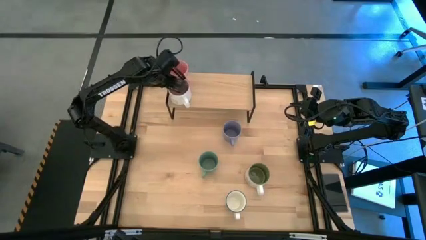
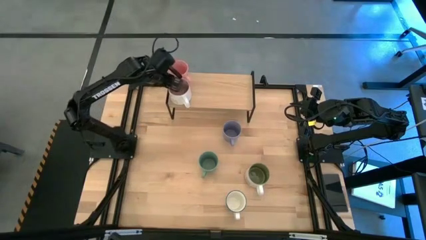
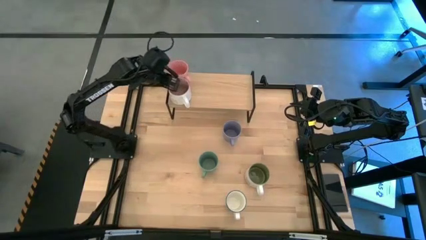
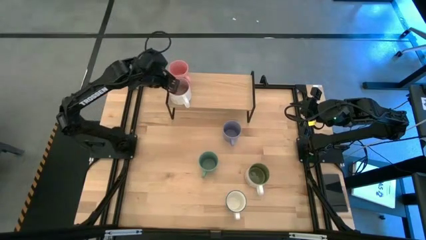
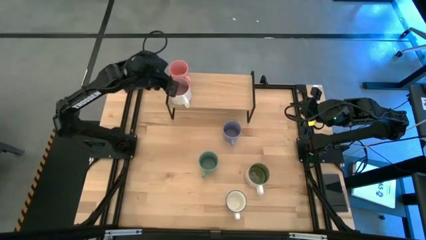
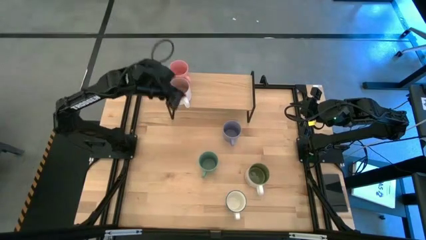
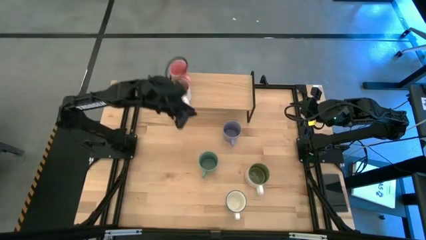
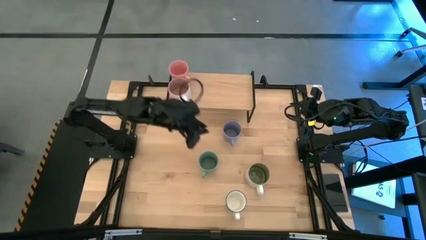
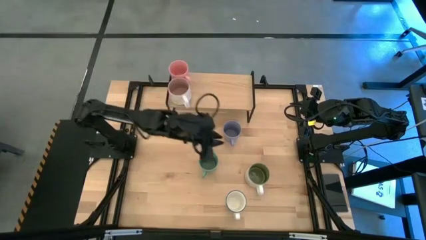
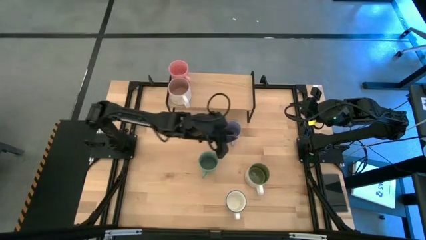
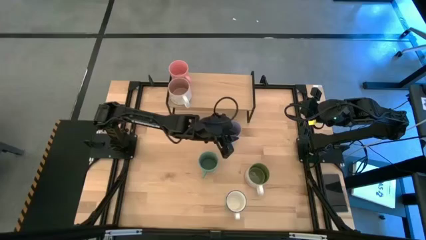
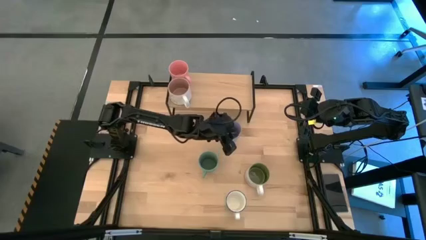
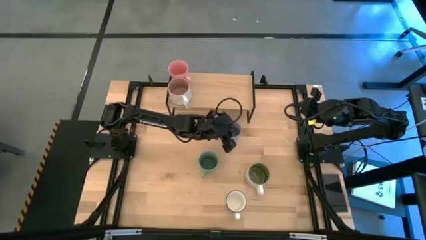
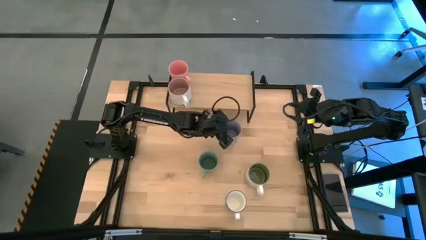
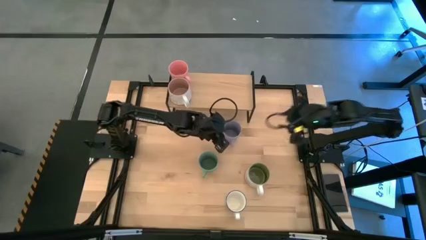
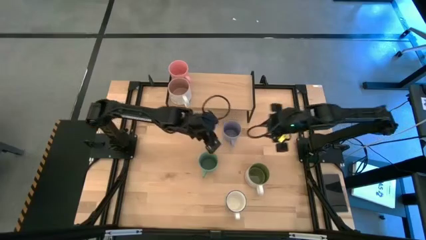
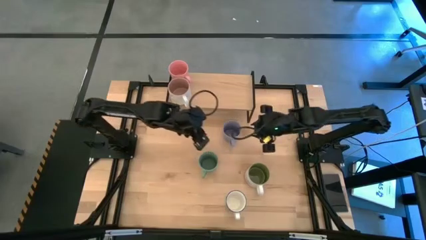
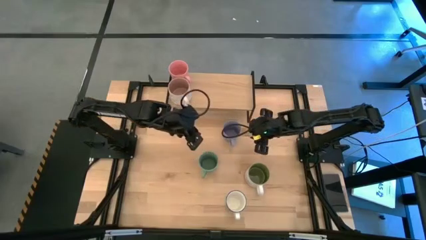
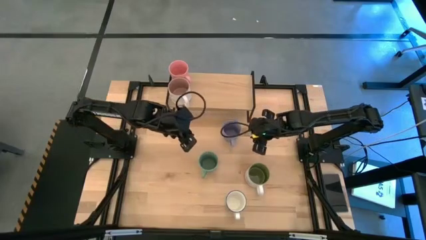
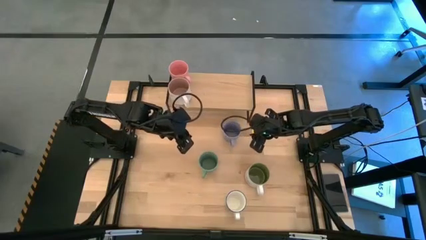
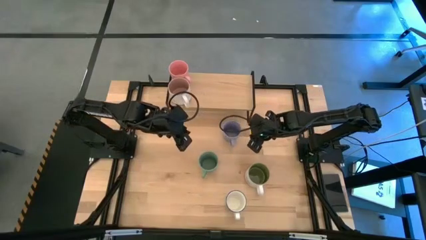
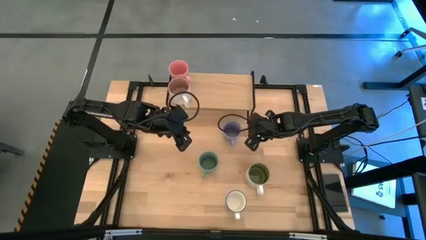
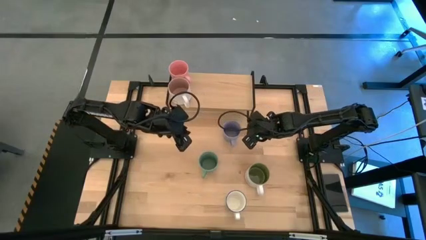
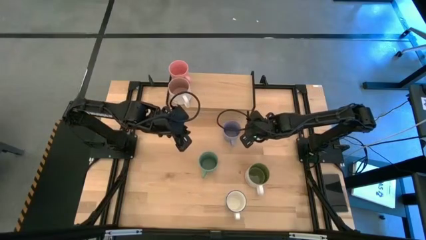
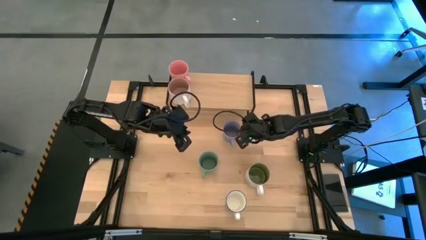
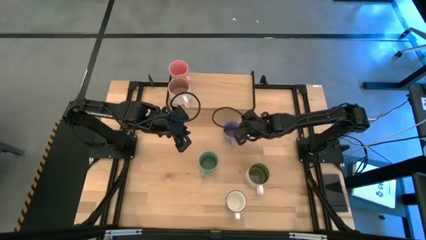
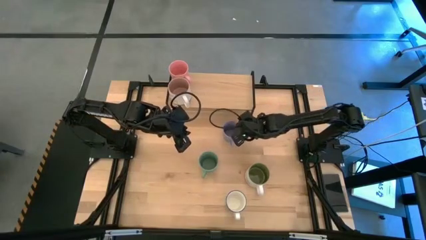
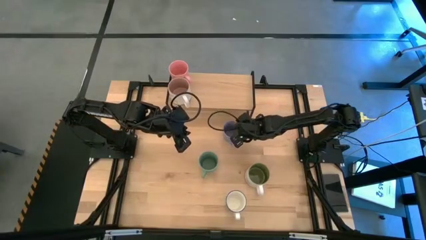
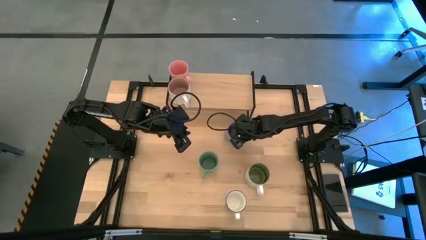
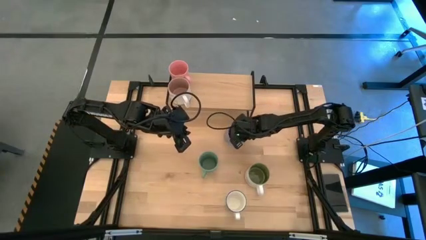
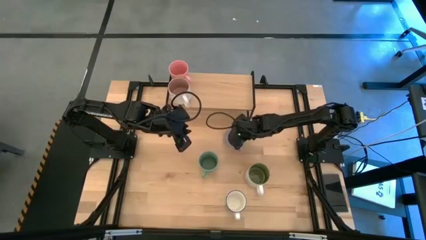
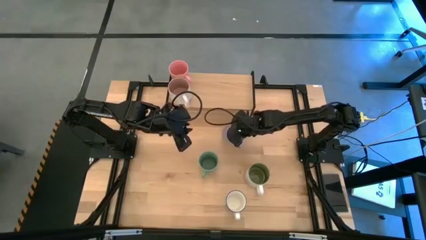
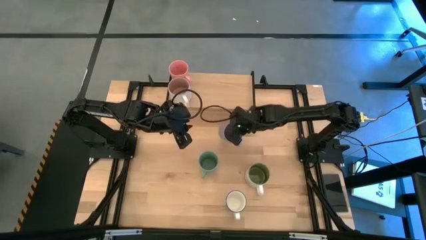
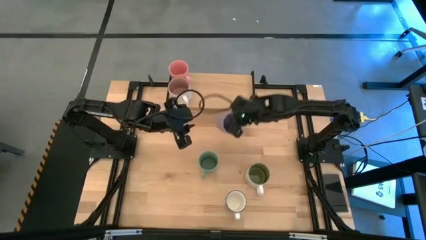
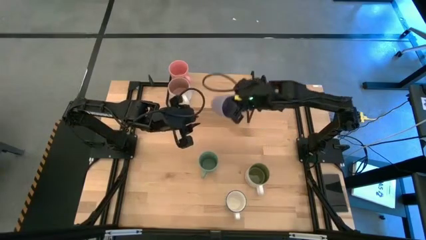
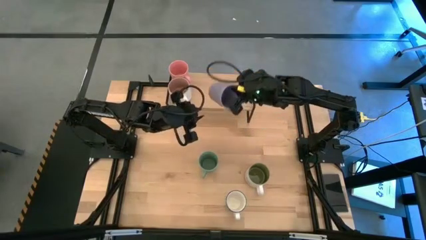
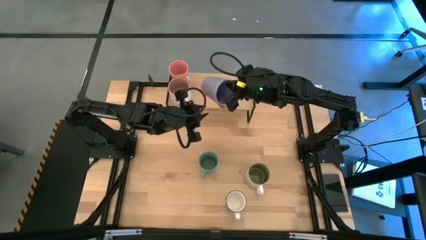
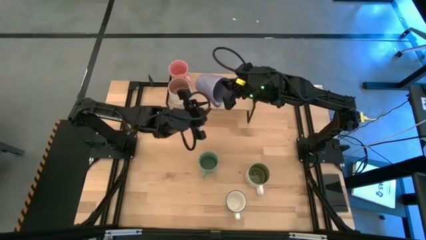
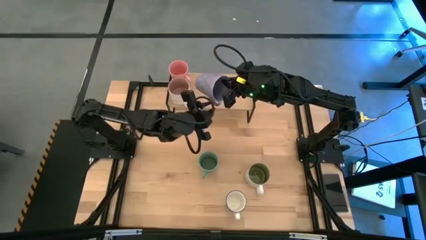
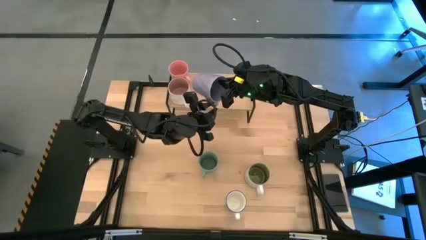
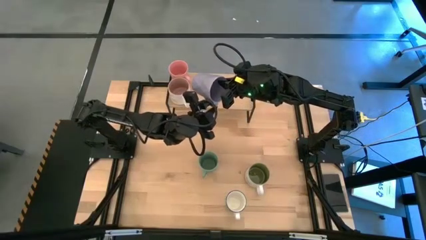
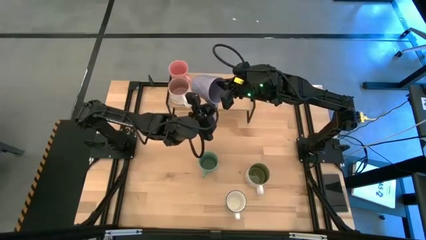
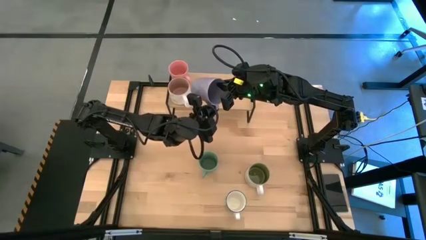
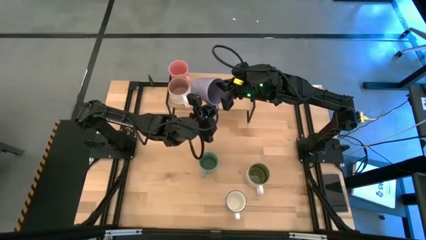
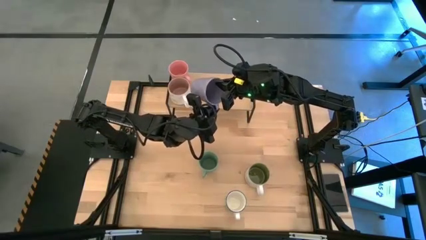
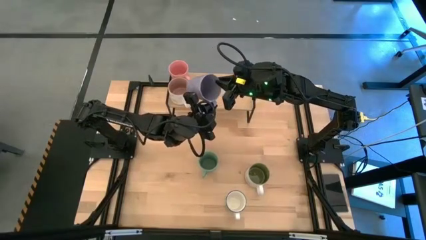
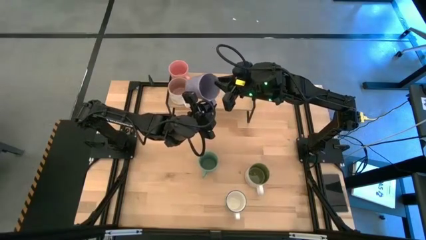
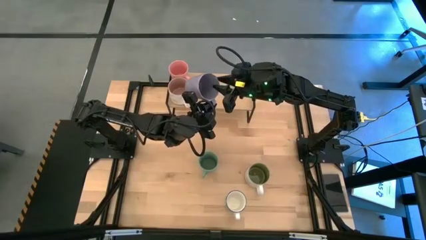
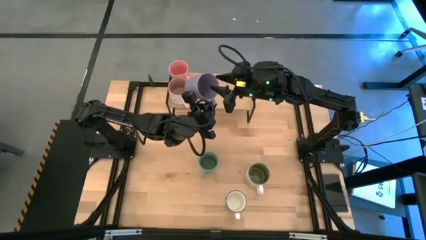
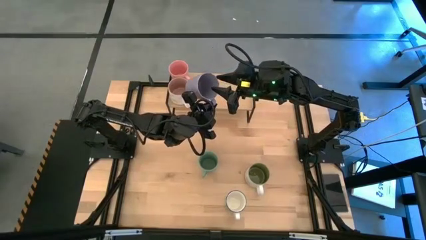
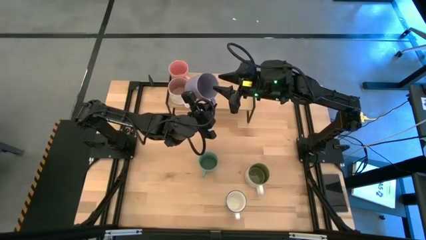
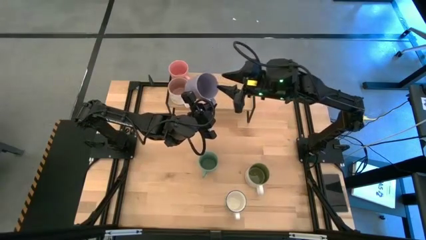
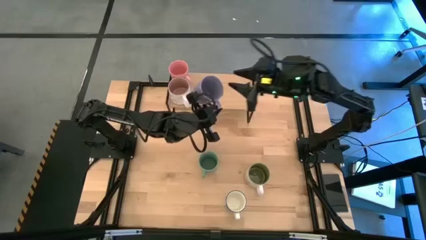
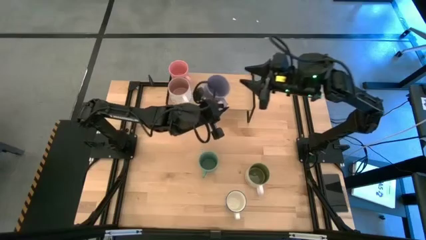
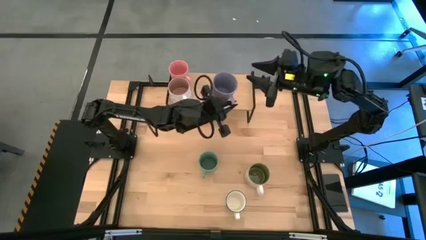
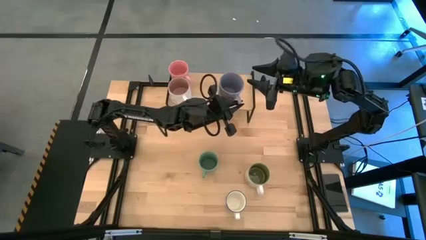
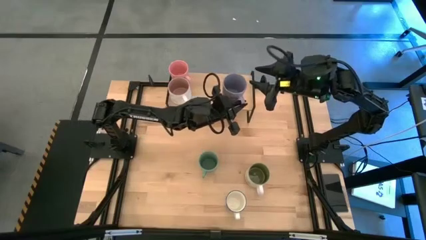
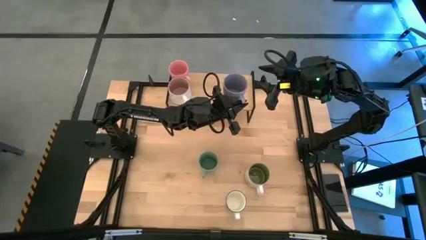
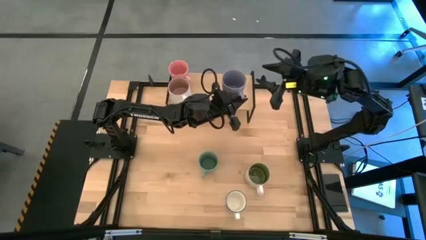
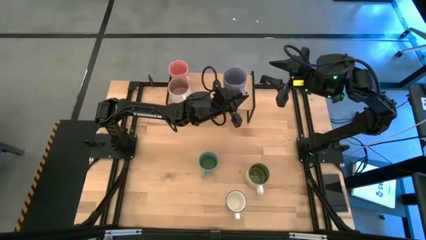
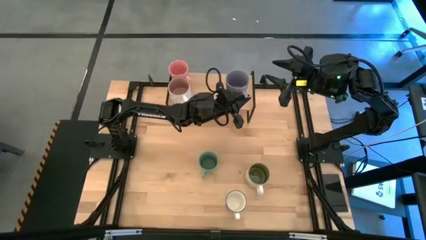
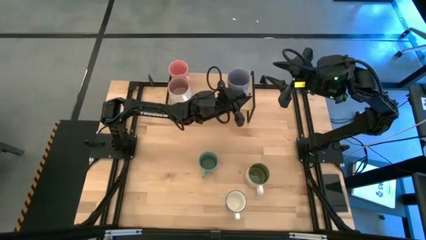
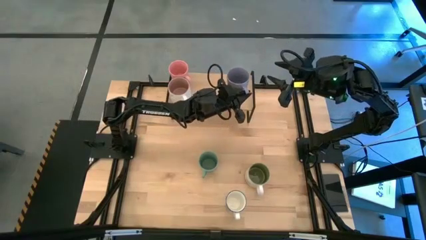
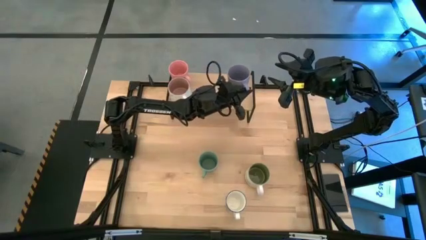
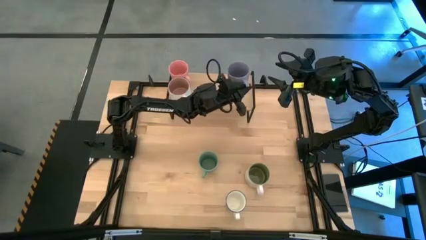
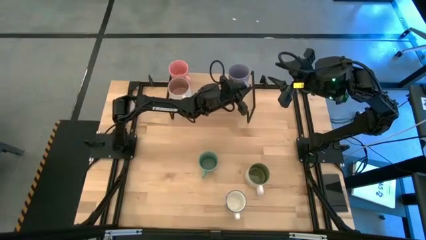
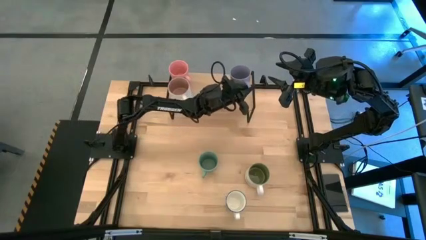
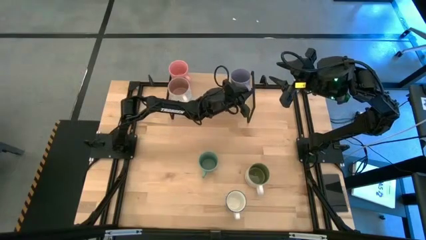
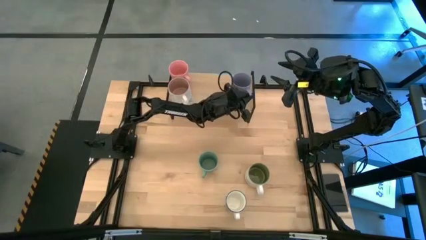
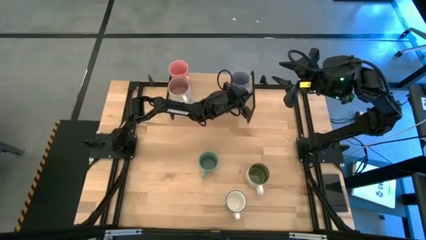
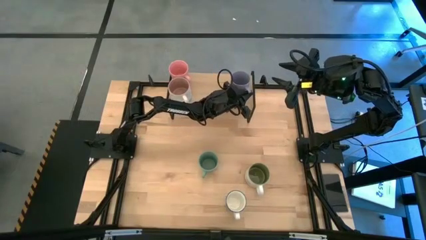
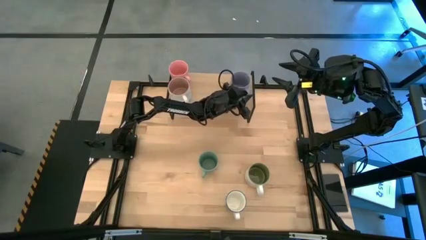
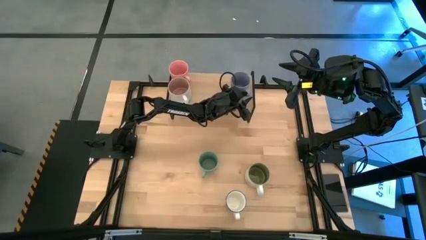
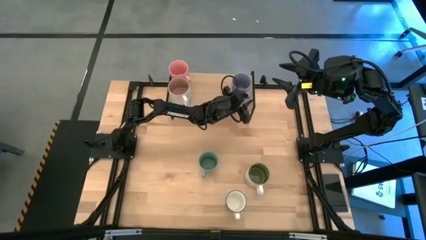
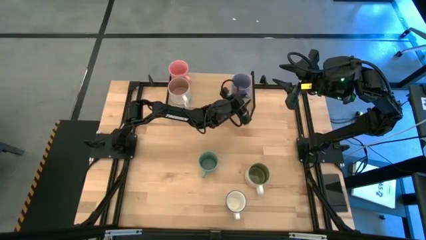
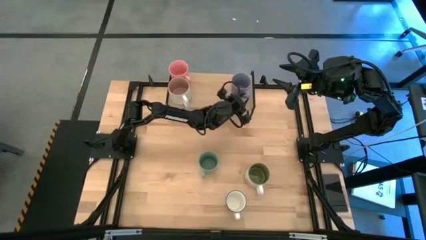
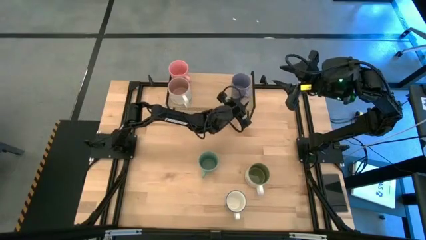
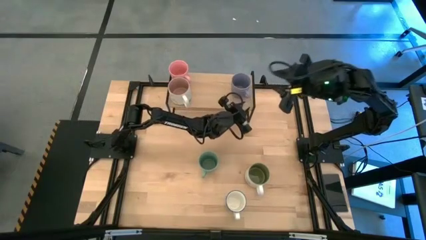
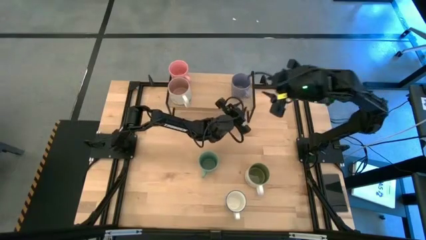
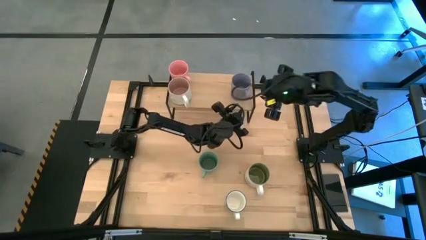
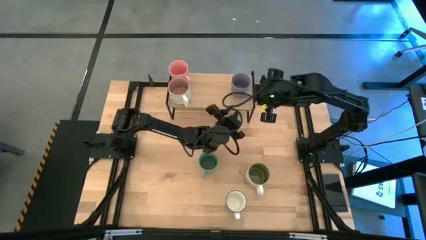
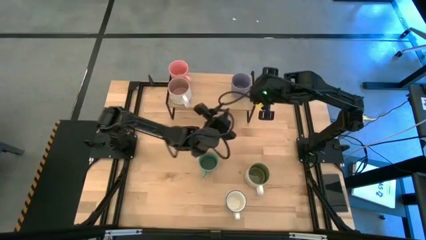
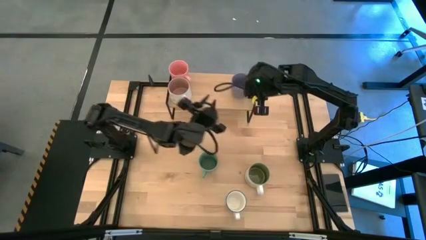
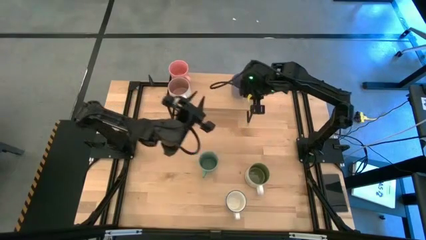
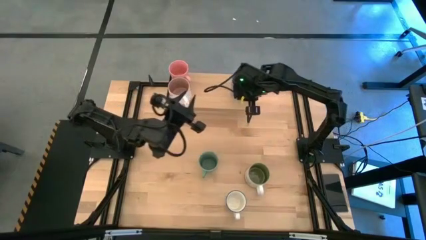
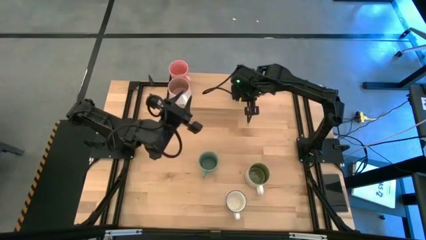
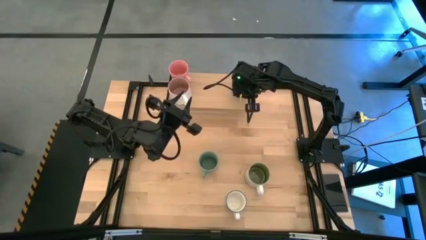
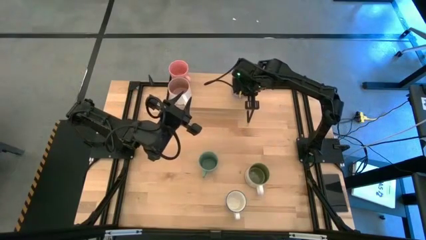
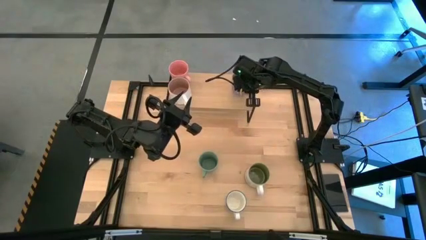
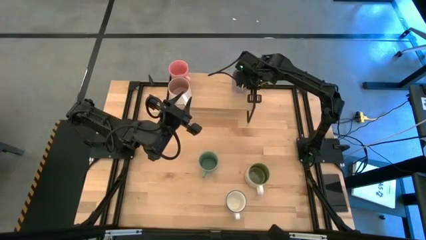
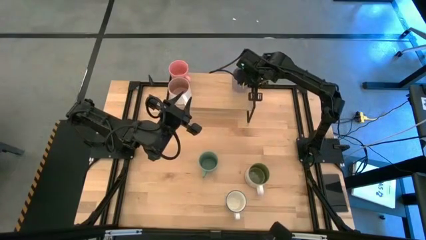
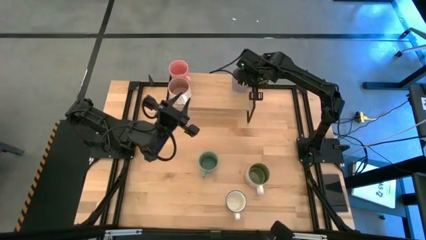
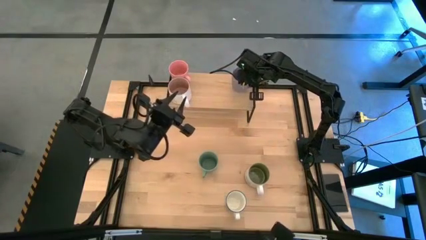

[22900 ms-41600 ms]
Task: Place coffee mugs
Put the violet mug on the shelf
